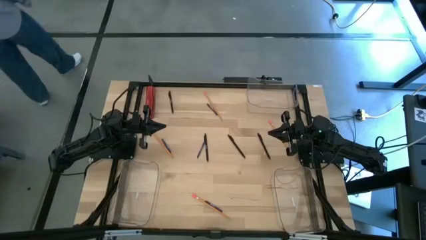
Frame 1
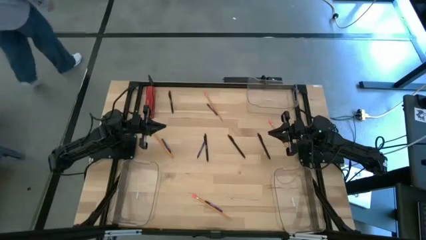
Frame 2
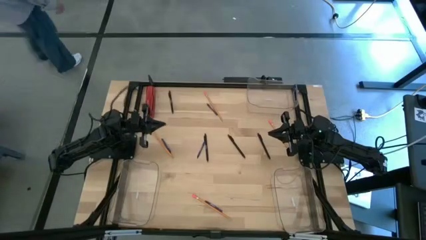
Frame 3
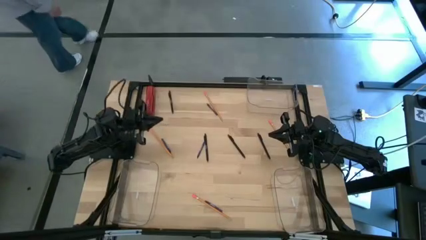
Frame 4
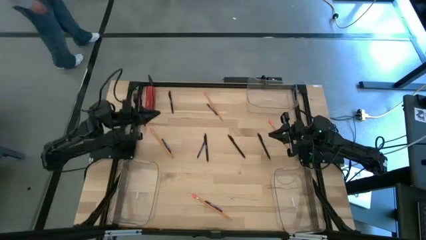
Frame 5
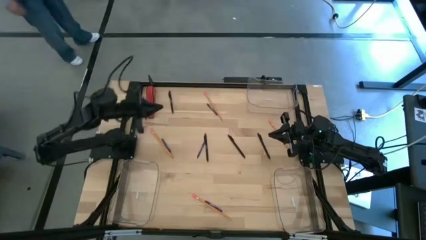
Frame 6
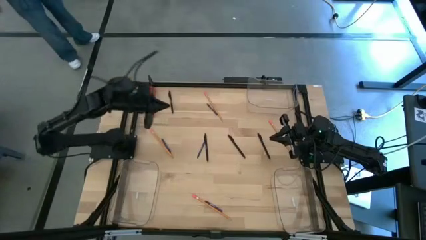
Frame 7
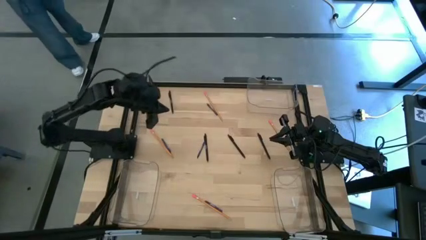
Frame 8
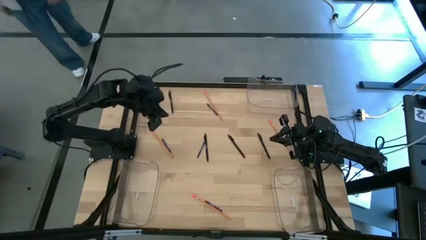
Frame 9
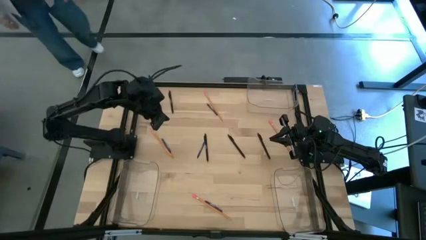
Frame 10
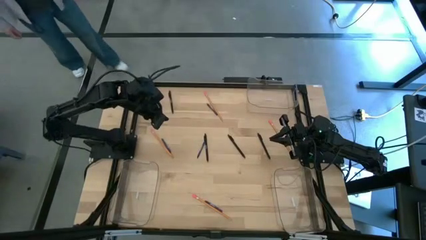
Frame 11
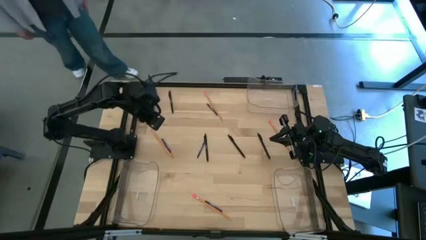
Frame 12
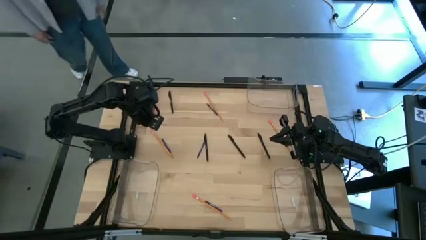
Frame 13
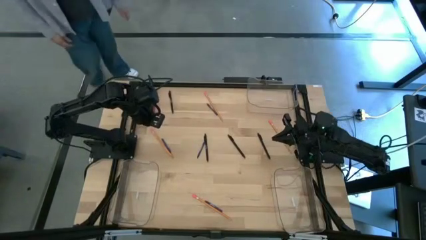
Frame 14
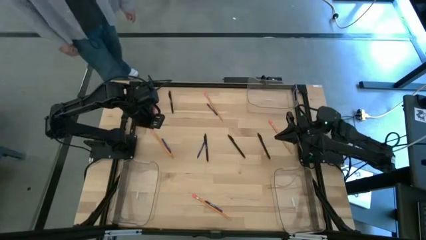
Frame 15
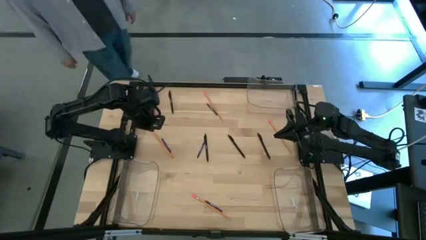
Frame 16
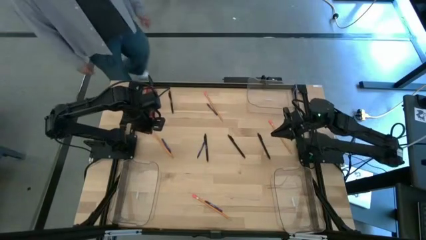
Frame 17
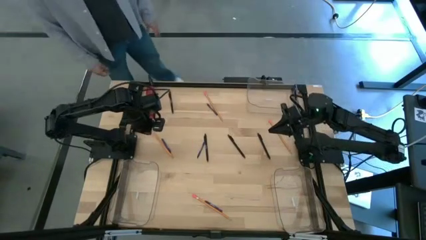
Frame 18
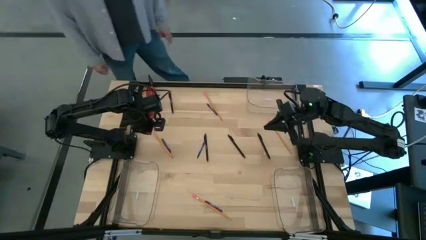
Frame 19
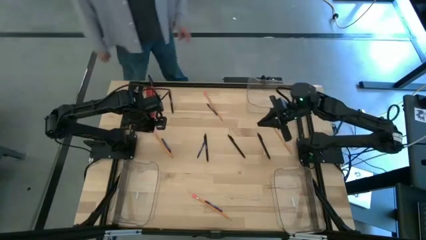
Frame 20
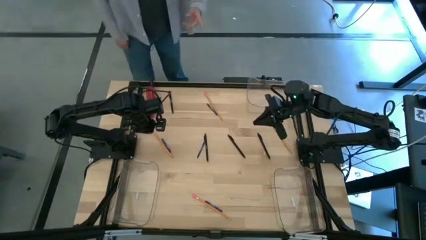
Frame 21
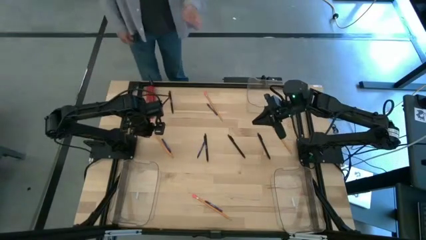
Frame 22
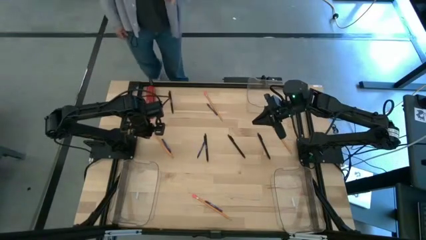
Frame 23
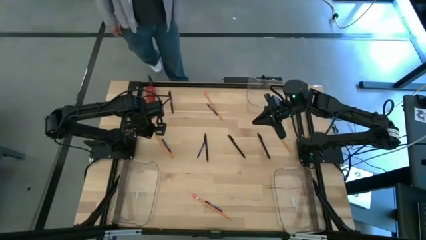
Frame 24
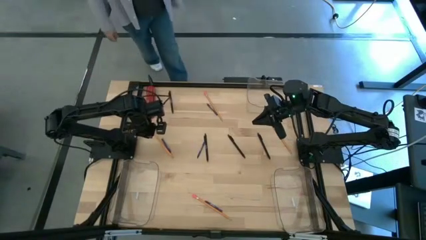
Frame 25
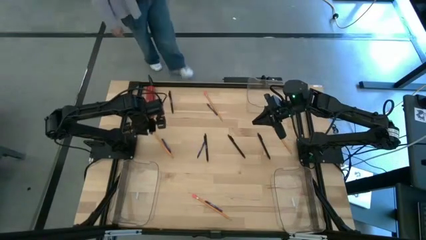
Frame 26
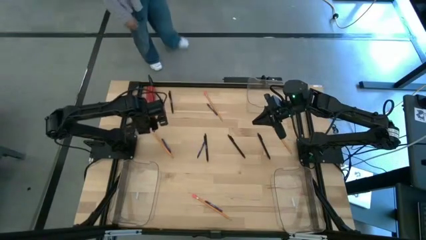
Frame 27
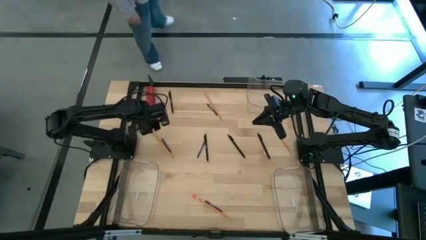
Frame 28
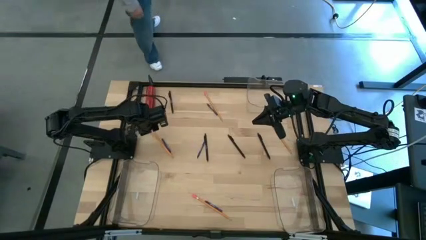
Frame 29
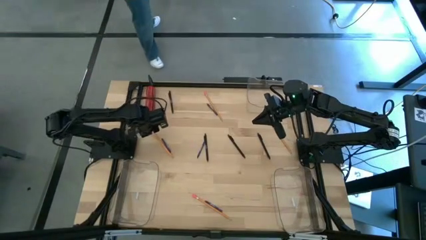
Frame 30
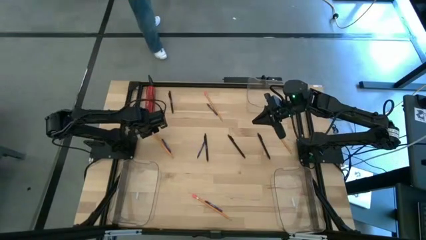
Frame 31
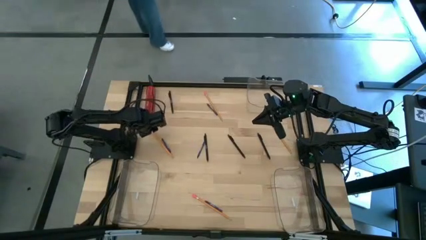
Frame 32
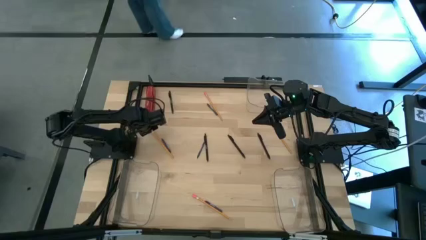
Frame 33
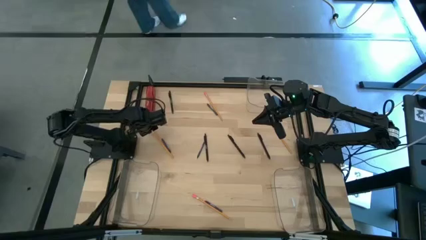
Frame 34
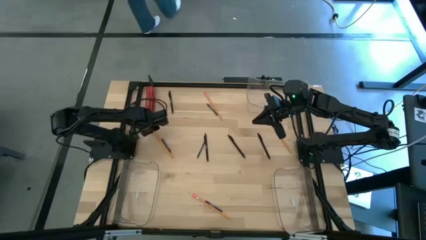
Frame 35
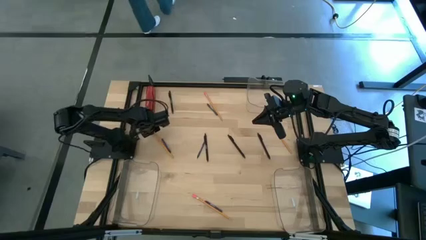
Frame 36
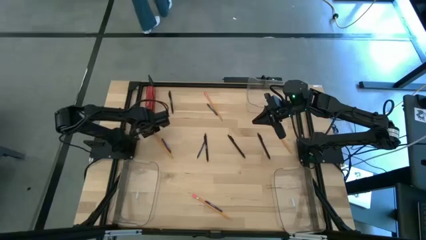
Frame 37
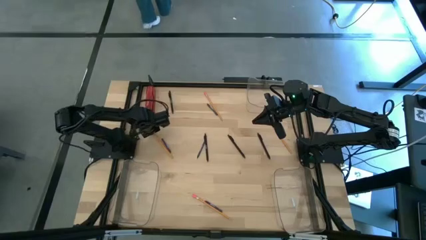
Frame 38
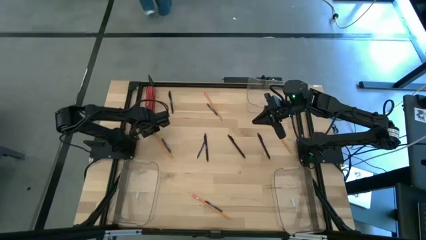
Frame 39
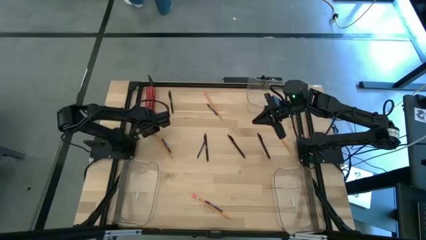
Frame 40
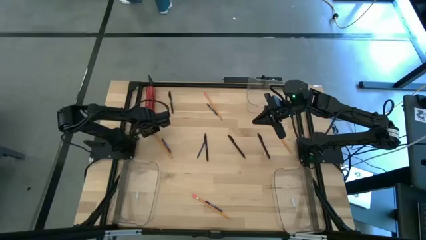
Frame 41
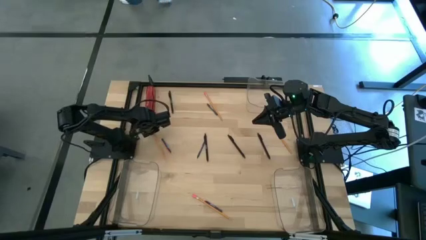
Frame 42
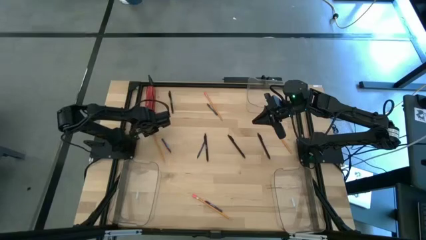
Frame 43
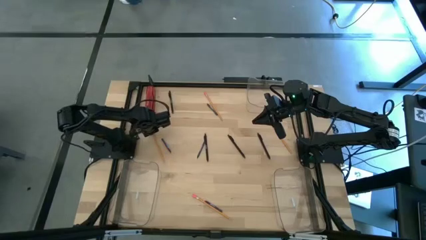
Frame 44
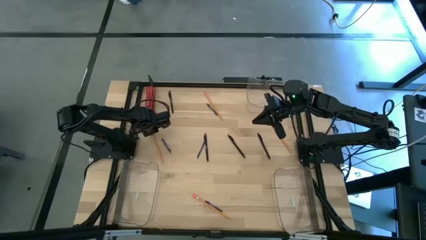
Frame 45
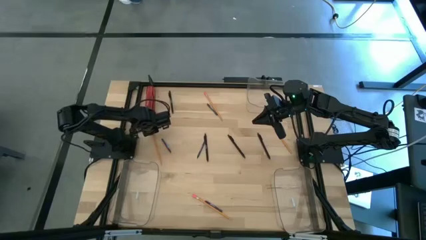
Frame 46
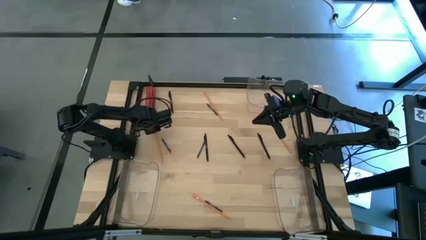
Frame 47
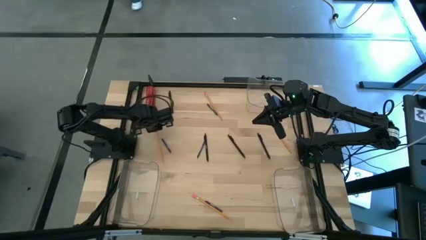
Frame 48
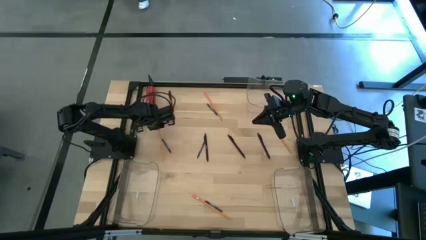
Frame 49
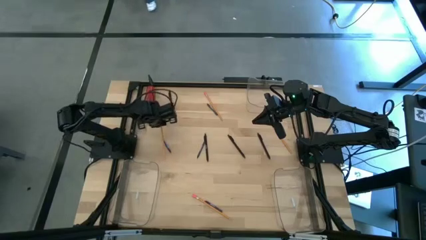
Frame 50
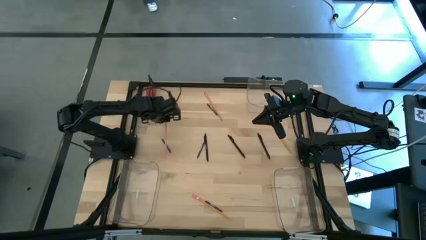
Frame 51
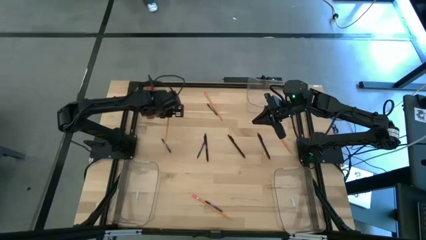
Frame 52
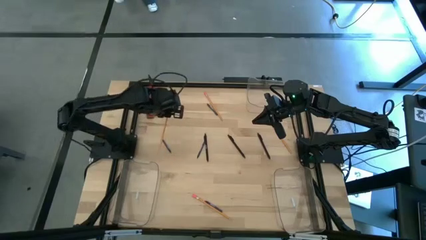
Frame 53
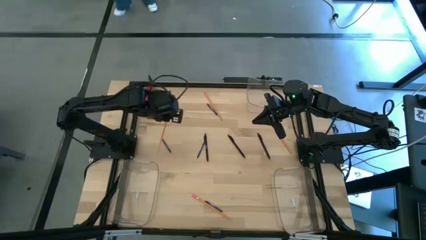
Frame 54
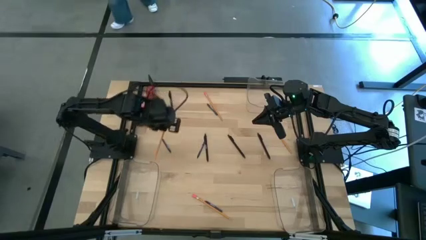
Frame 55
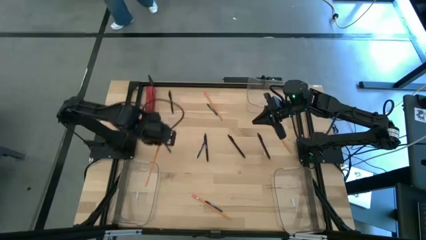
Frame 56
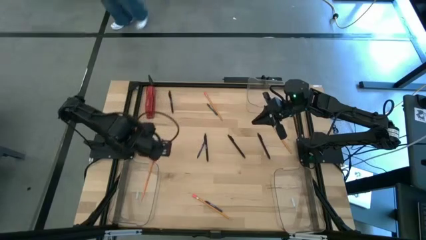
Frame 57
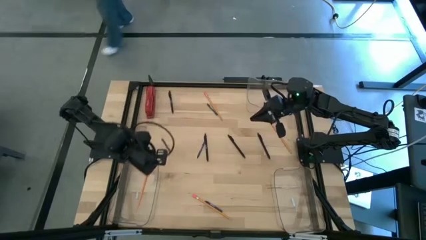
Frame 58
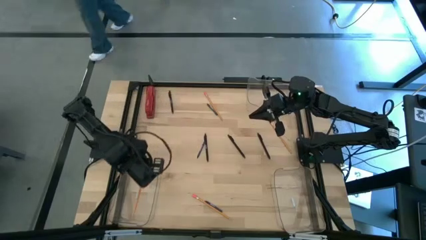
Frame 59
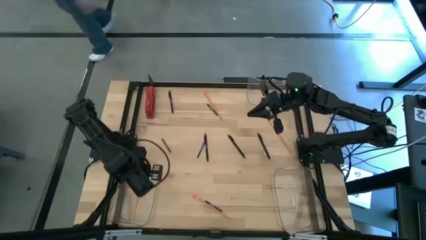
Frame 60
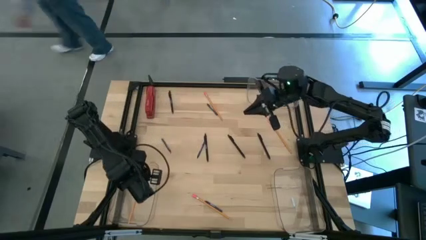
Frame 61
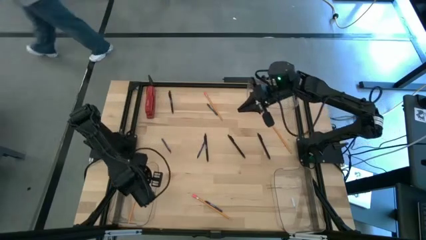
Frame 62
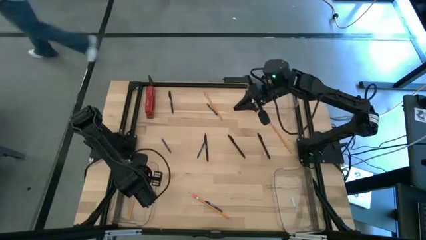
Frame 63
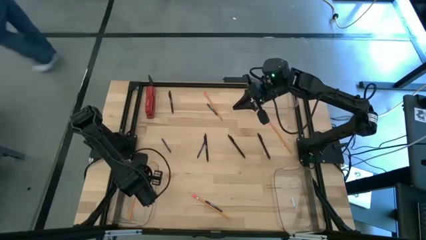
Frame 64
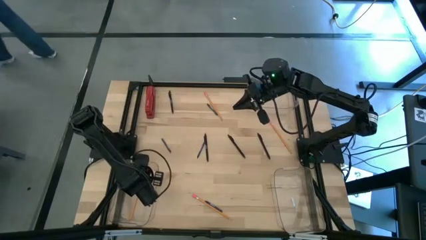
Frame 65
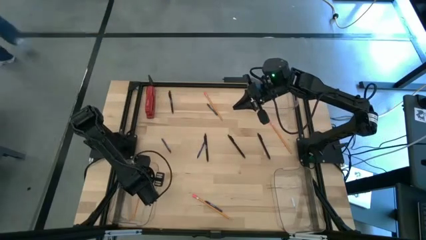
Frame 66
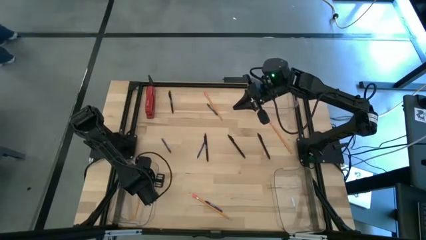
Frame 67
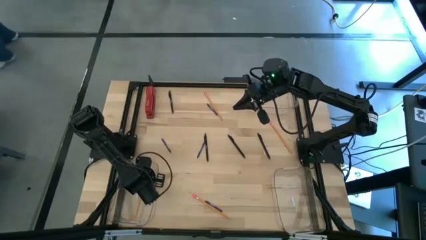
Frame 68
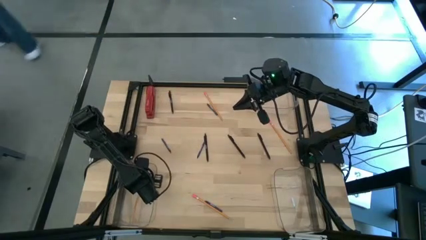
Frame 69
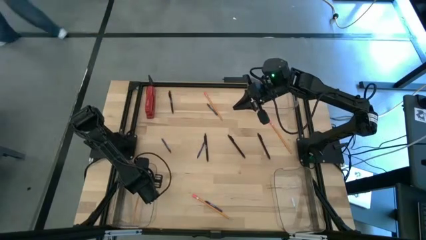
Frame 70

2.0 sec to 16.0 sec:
Task: Sort crayons/erasers/pens/pencils in bins
Put the yellow pencil into the bottom left transparent bin
